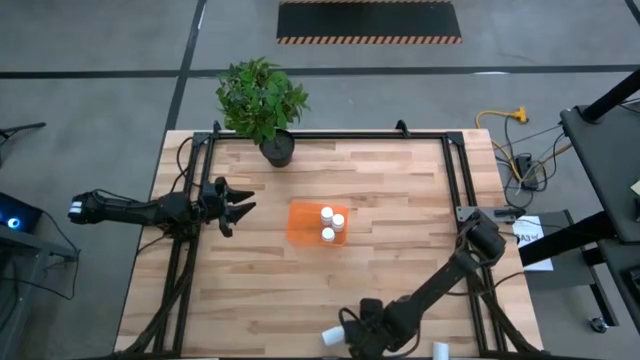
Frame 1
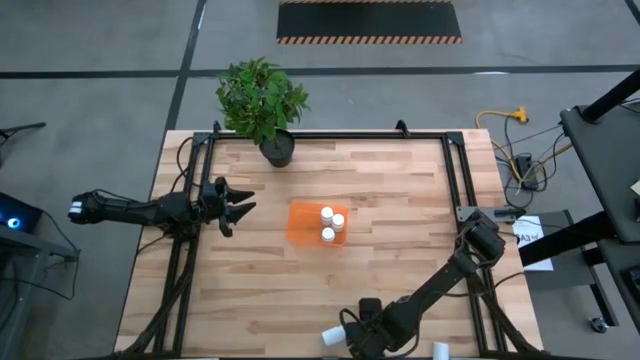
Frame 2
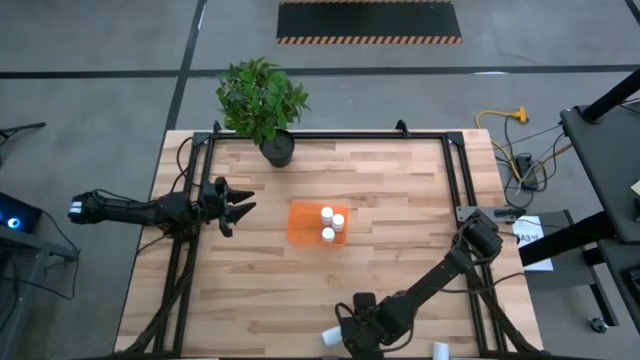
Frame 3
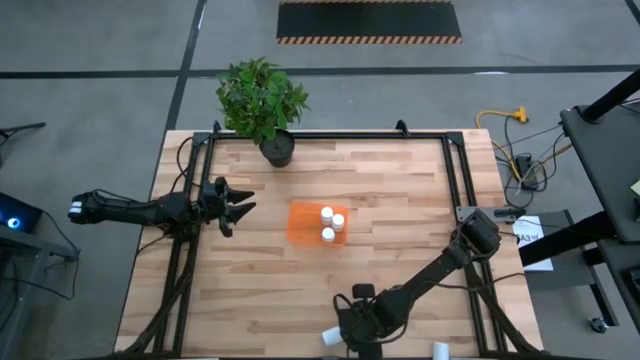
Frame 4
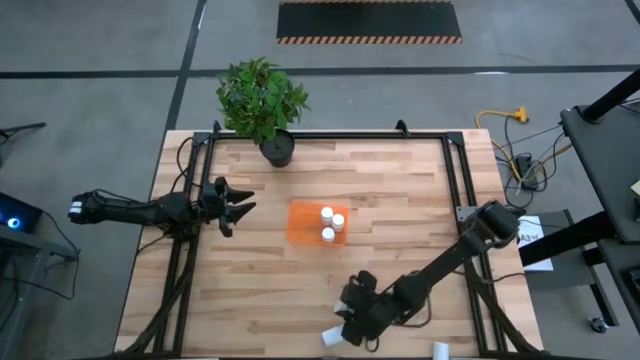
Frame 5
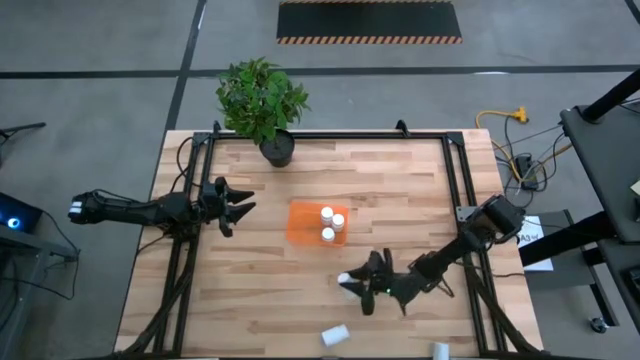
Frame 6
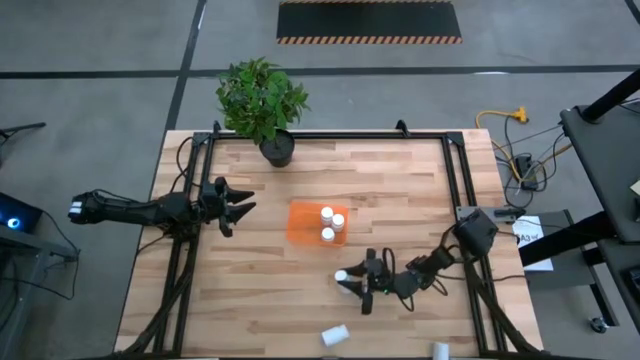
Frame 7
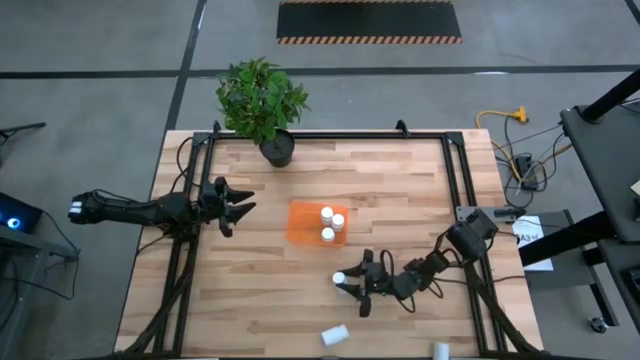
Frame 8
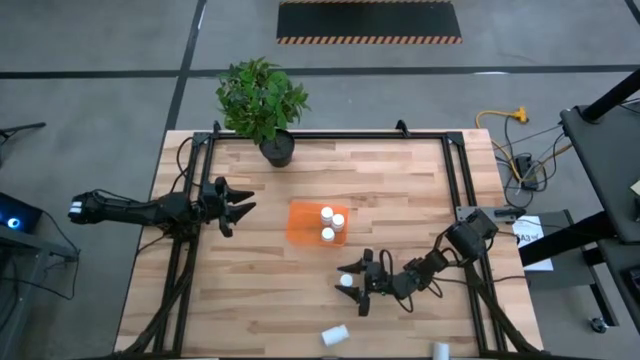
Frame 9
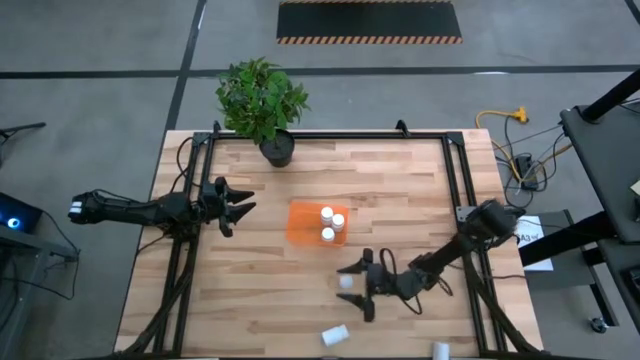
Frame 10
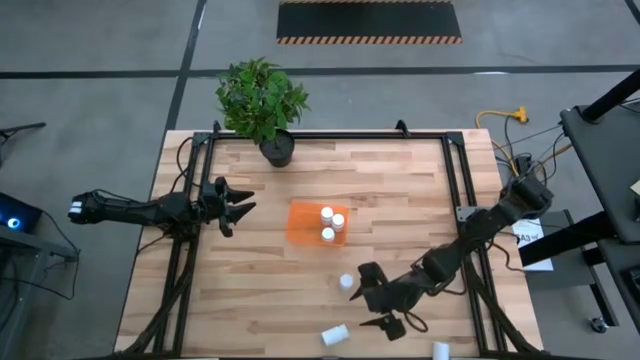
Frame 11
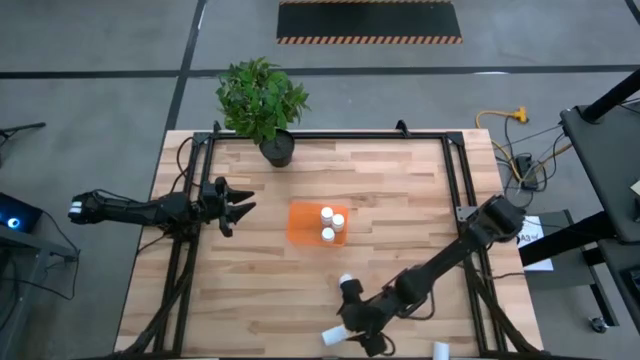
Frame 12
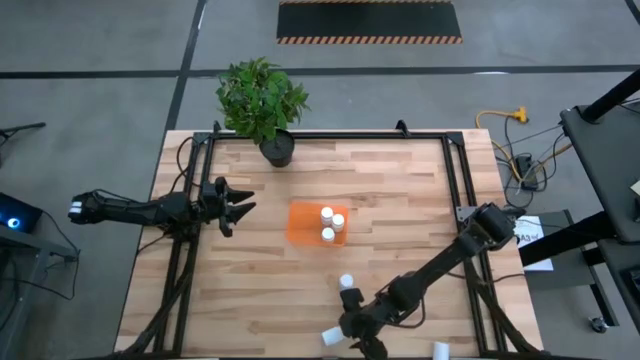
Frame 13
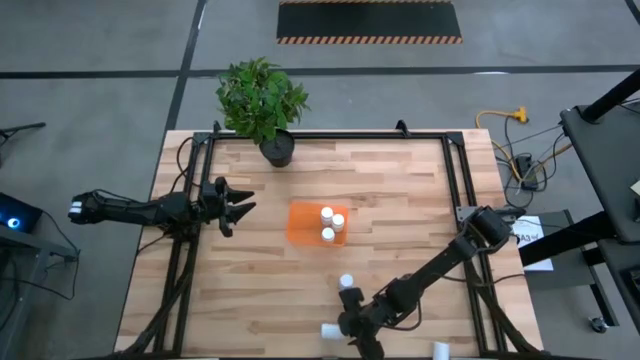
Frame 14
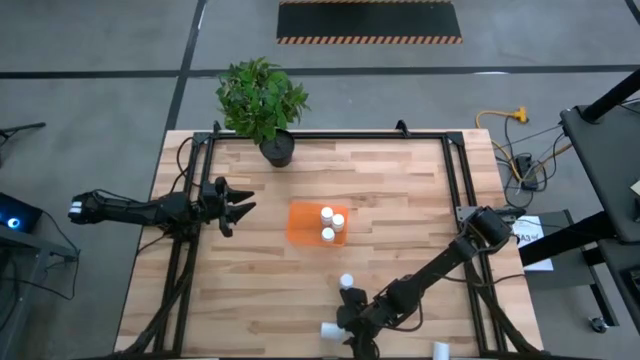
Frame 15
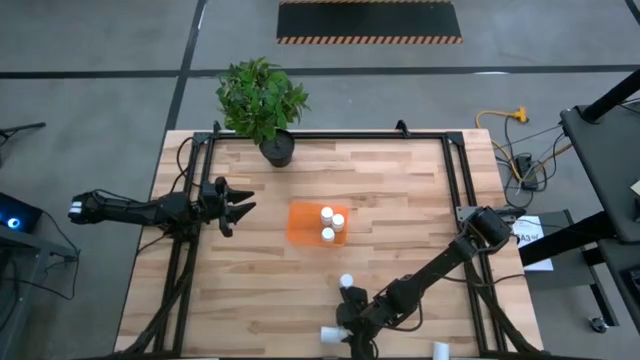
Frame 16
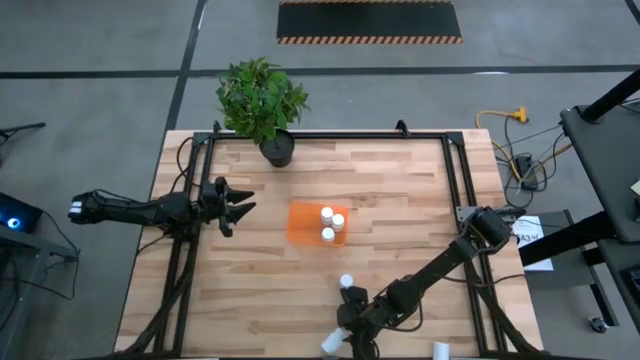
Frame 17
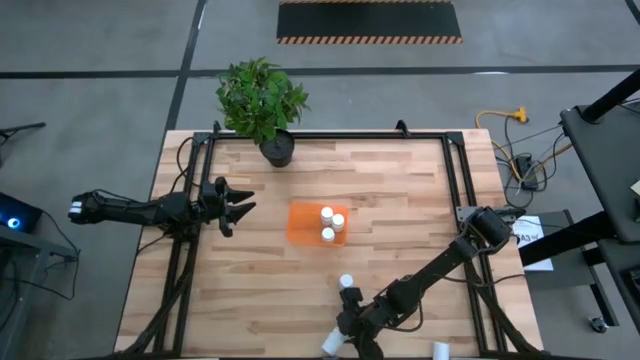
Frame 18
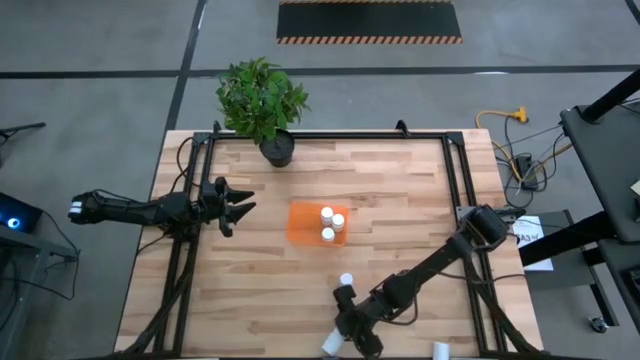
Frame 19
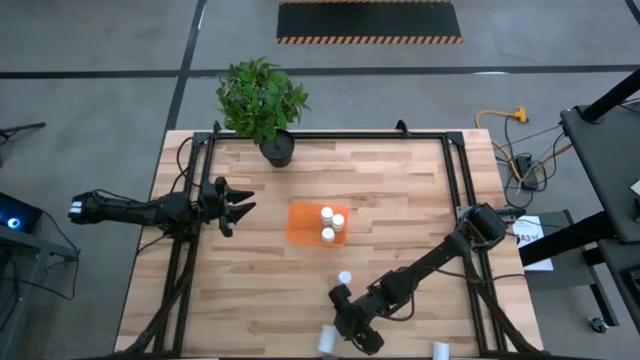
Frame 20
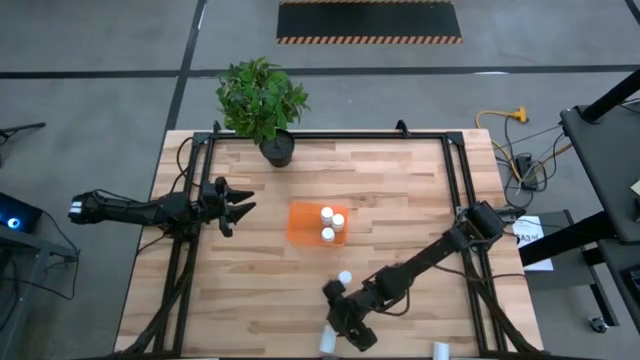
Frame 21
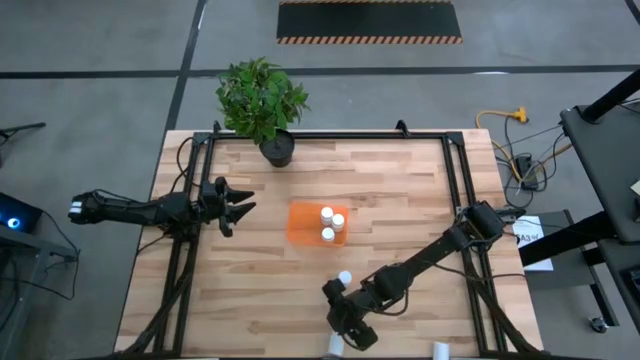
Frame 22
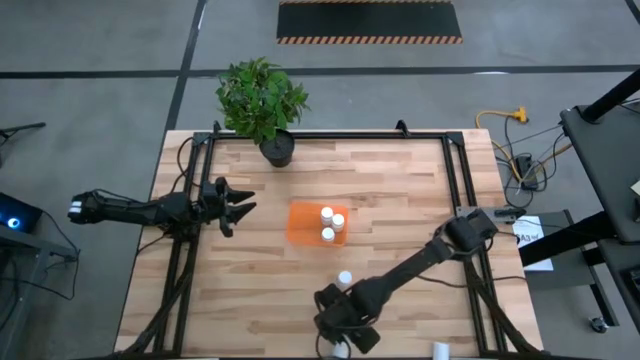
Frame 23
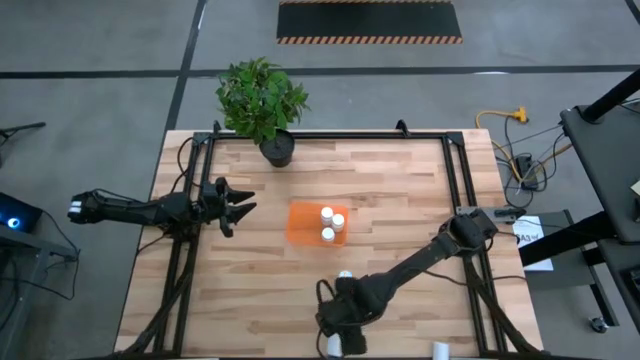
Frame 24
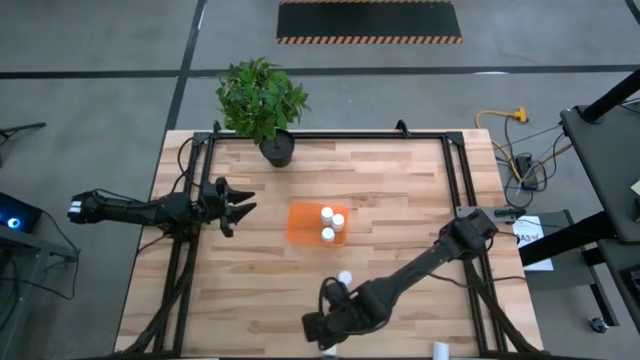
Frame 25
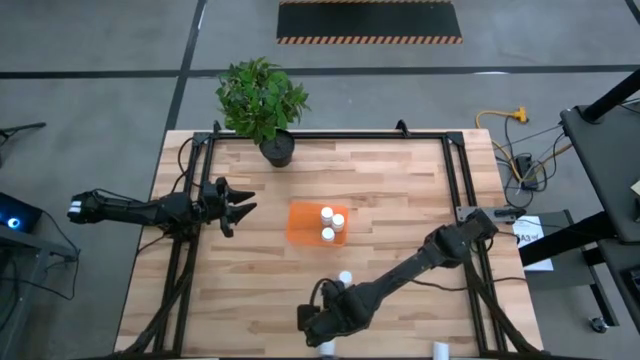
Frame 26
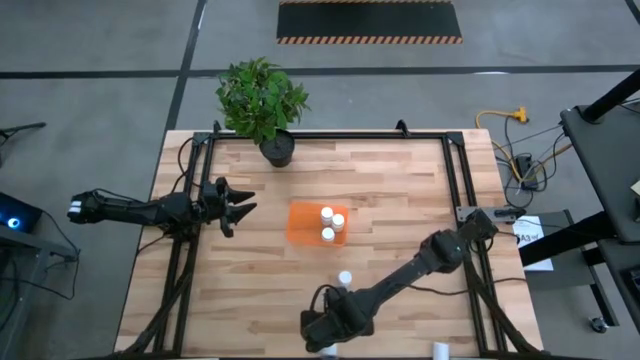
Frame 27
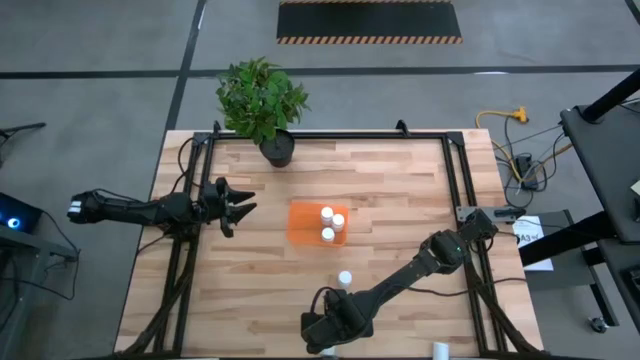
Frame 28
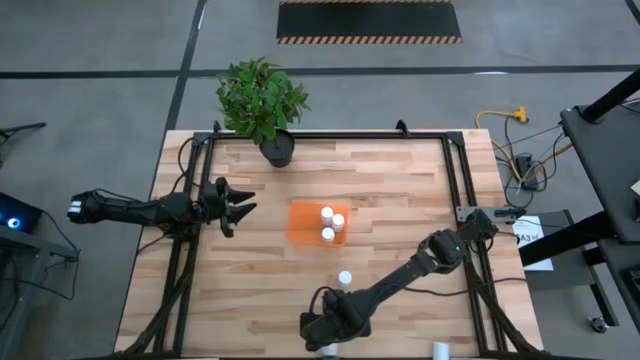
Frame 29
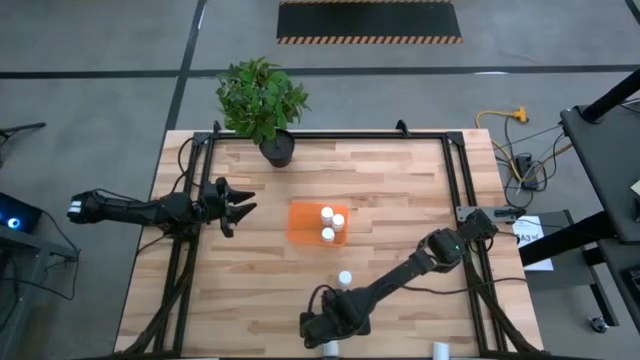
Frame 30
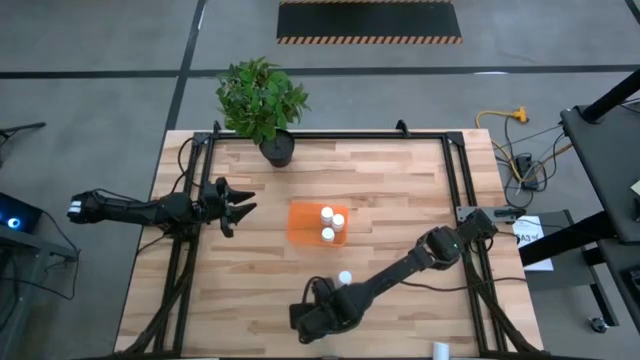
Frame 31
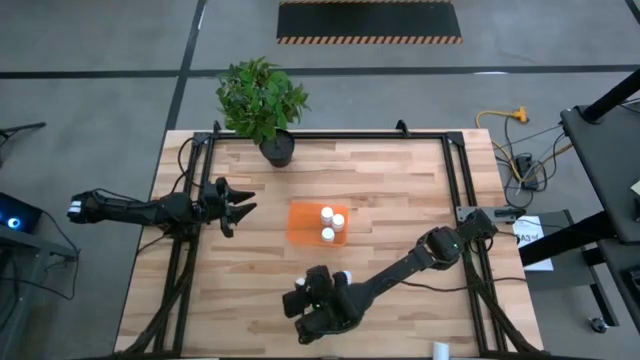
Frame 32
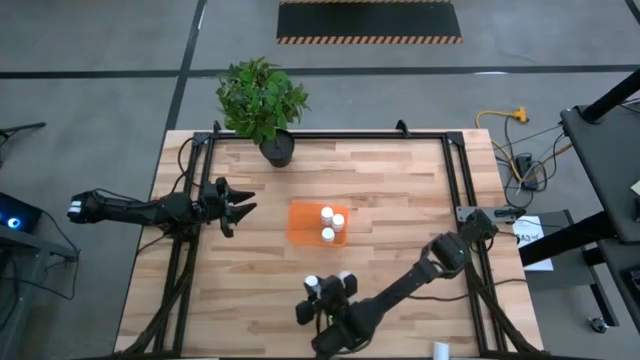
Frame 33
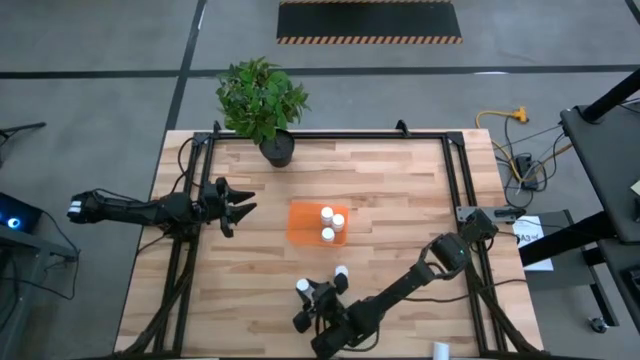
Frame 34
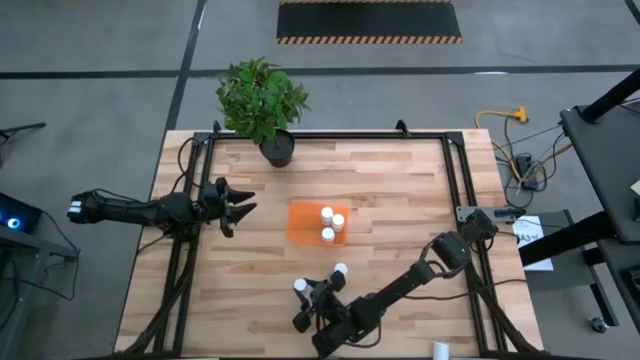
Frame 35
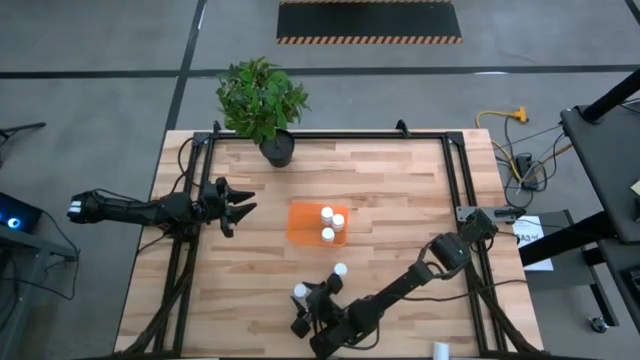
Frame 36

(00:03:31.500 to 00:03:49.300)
Task: Pick and place pill bottles into a basket
Adjust the white pill bottles on the table

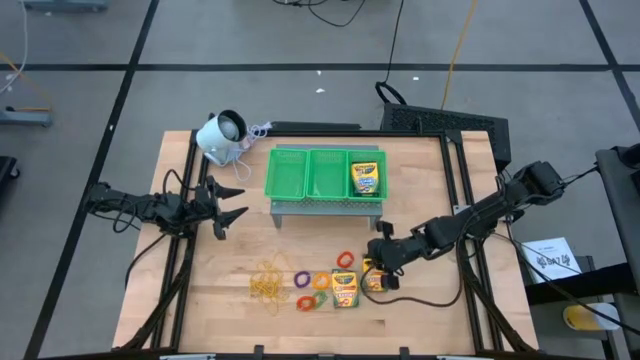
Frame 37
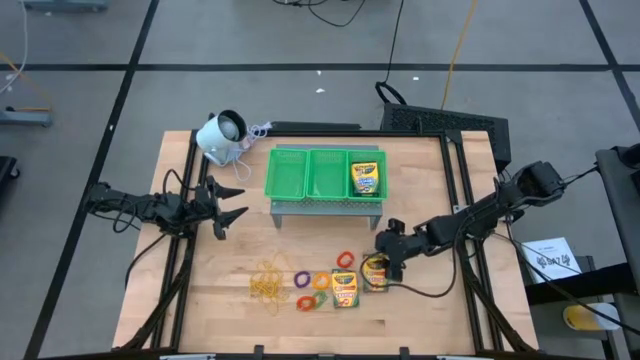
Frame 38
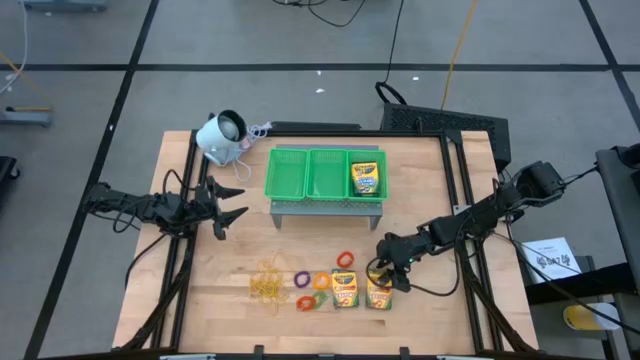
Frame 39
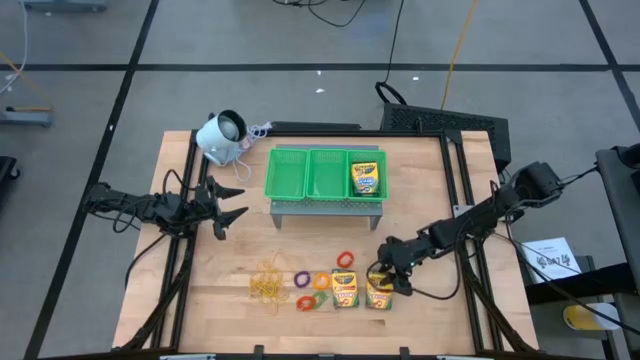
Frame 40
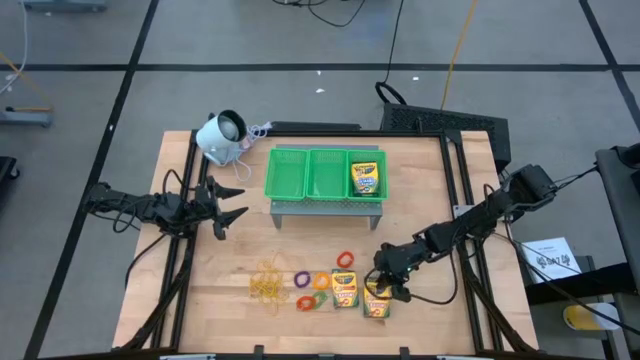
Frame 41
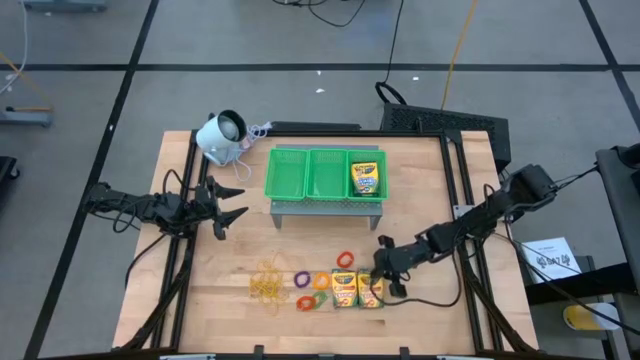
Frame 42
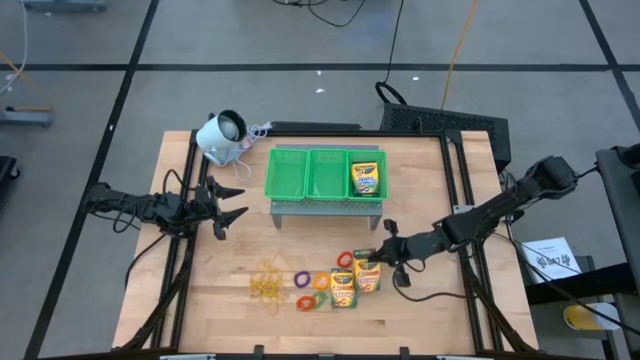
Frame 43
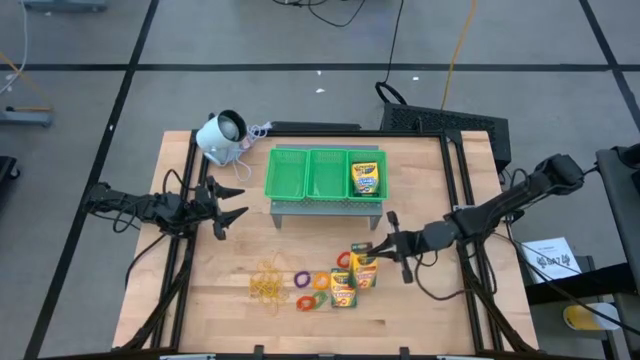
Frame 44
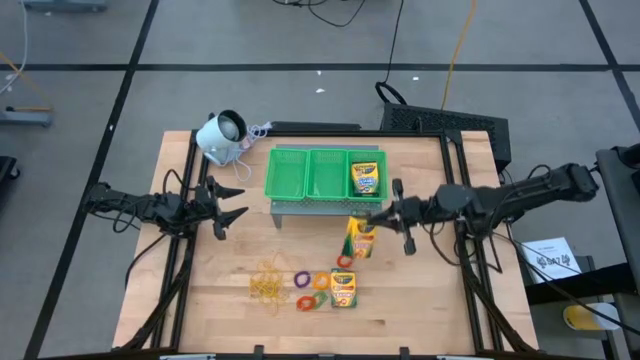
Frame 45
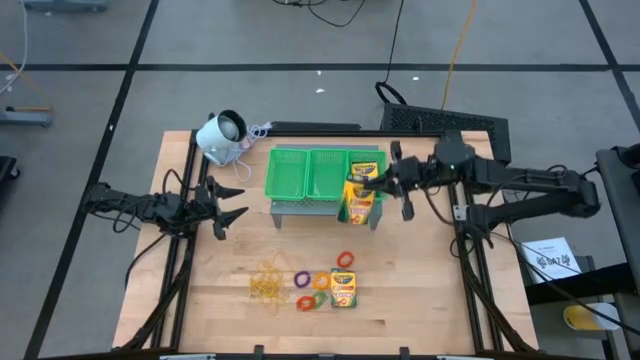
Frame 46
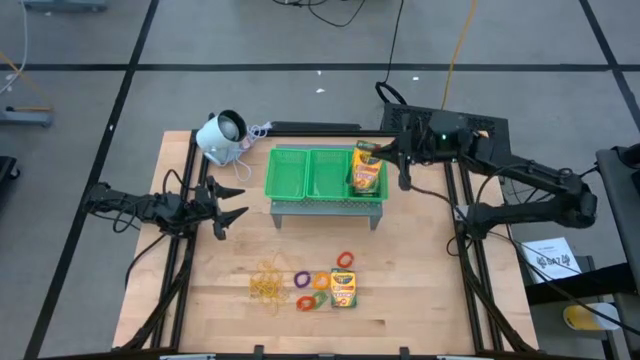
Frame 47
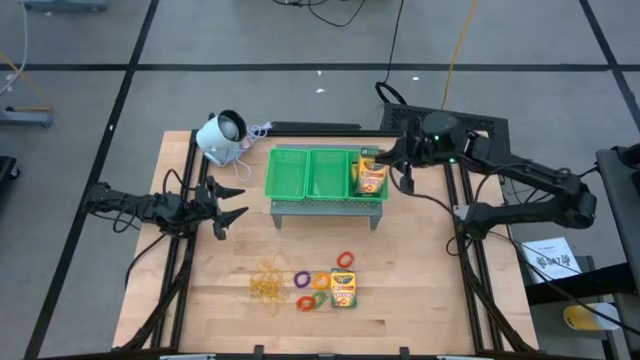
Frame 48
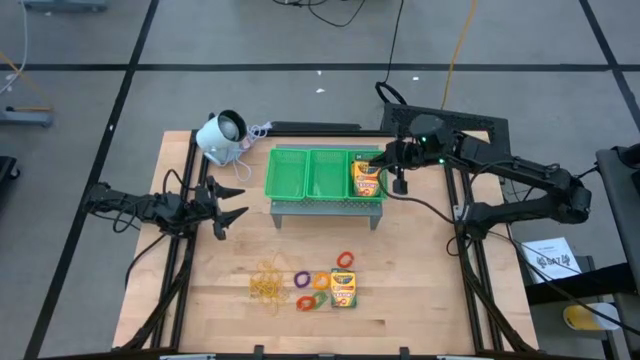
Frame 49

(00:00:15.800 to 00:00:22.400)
Task: Pick & Place Office Desk Supplies
Stack the right yellow crayon box on the yellow crayon box in the right green basket
